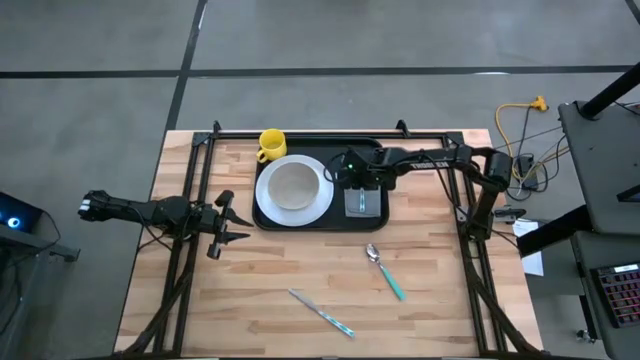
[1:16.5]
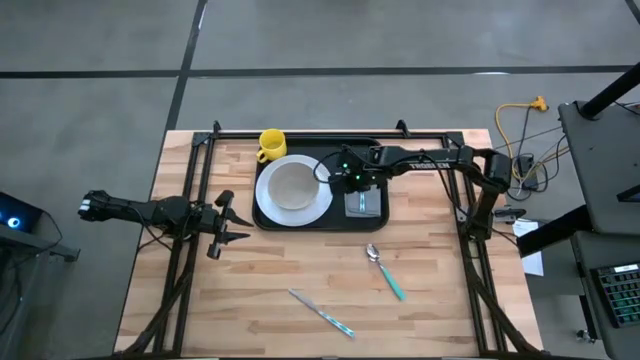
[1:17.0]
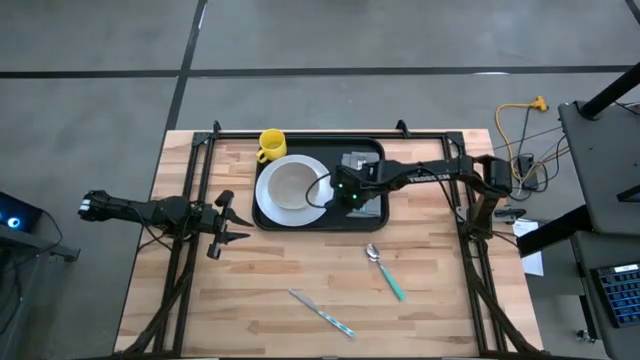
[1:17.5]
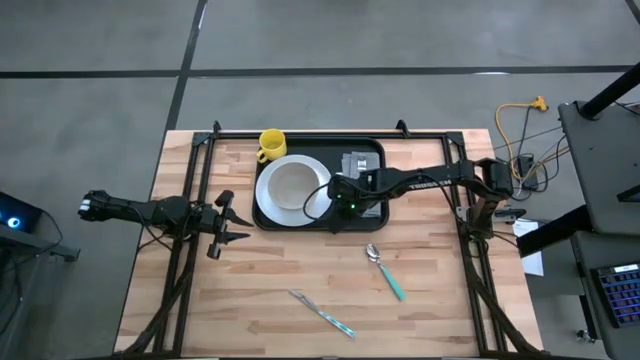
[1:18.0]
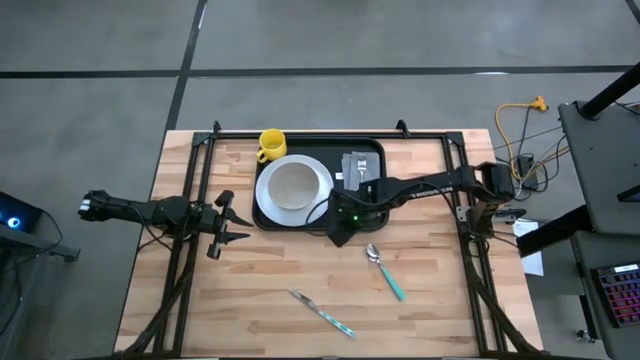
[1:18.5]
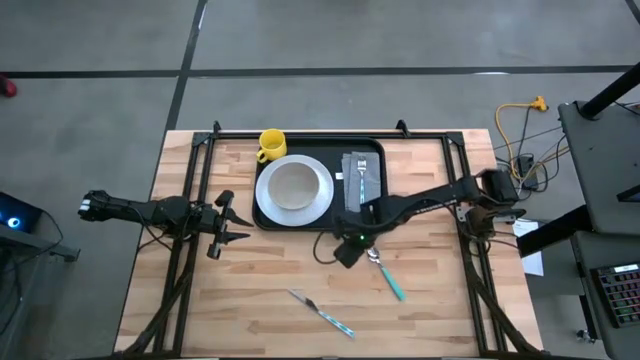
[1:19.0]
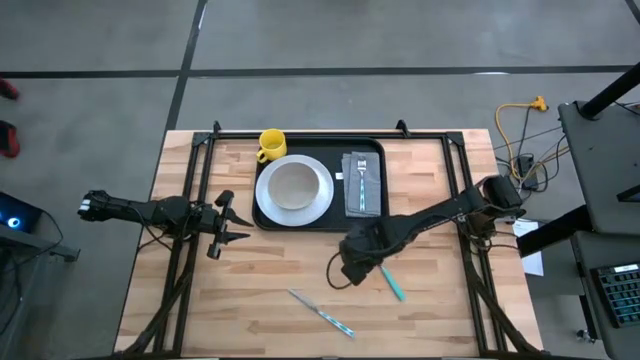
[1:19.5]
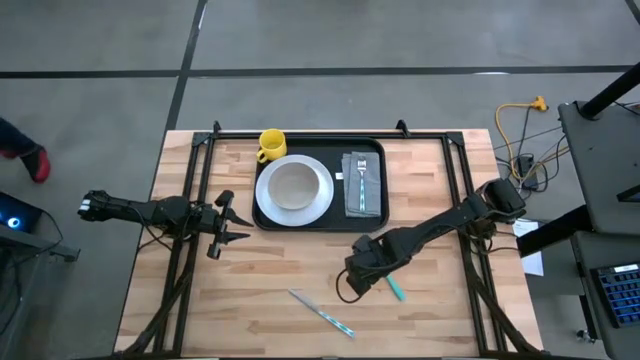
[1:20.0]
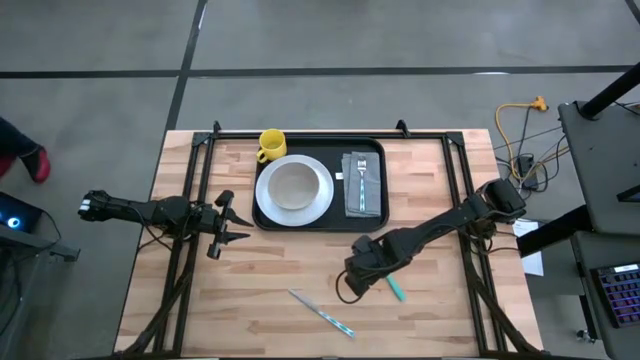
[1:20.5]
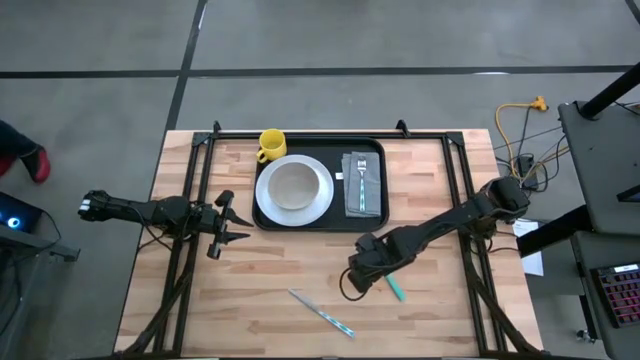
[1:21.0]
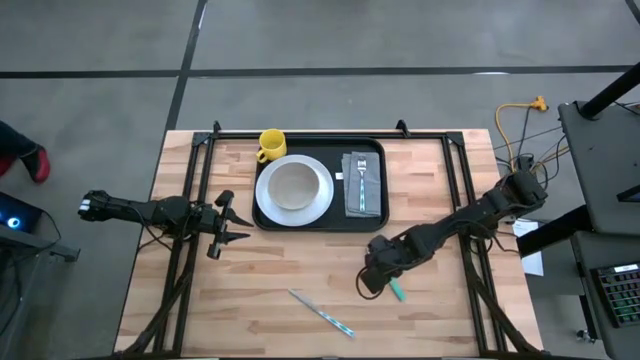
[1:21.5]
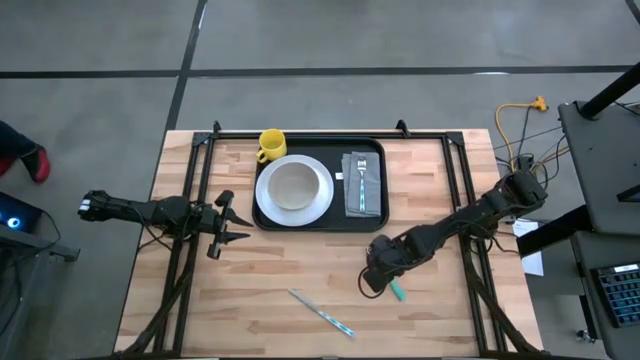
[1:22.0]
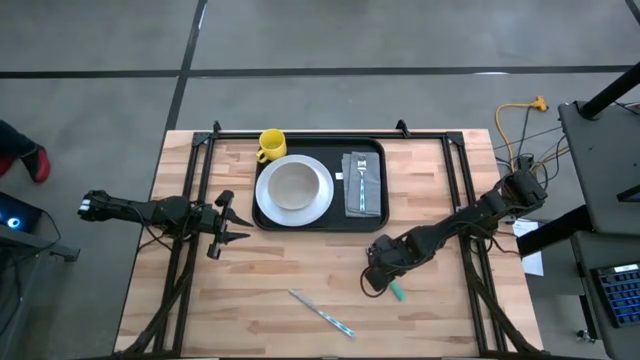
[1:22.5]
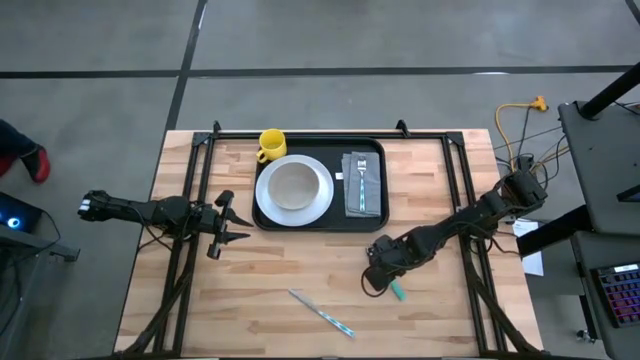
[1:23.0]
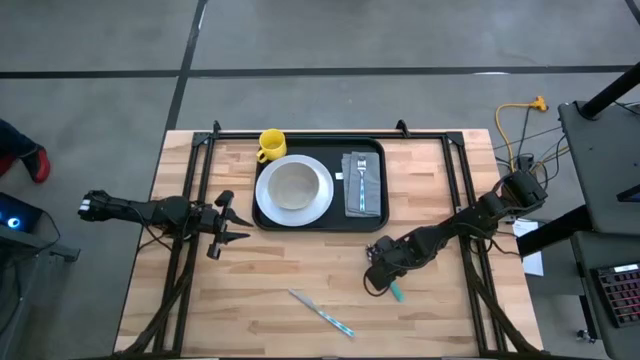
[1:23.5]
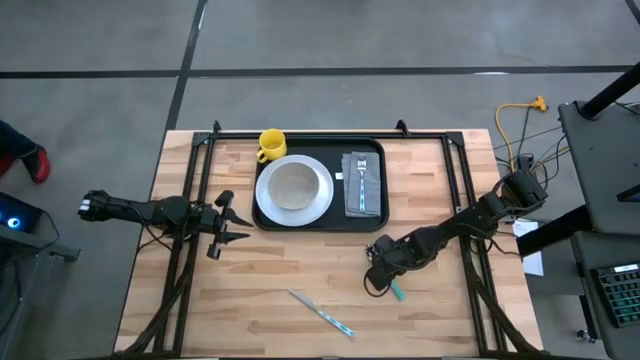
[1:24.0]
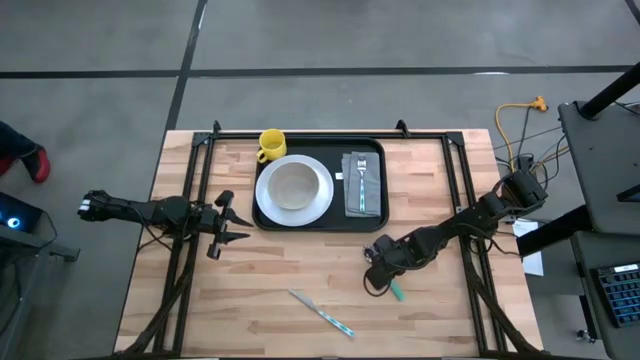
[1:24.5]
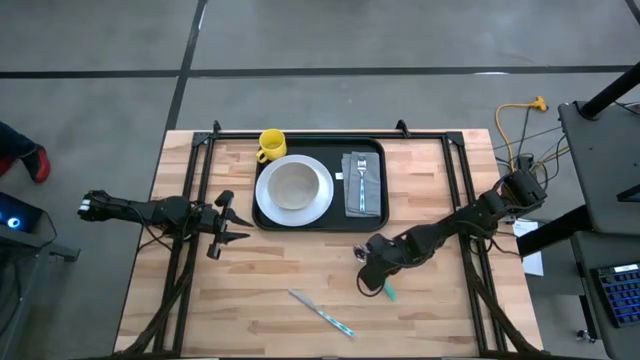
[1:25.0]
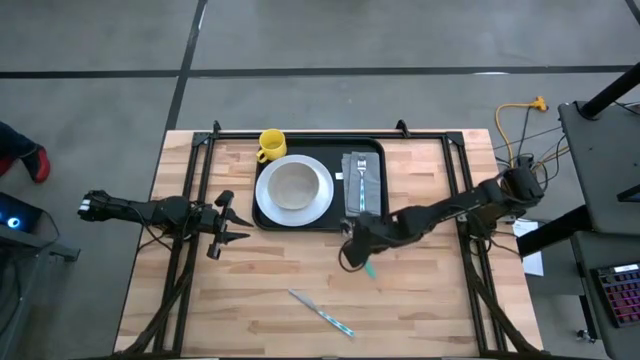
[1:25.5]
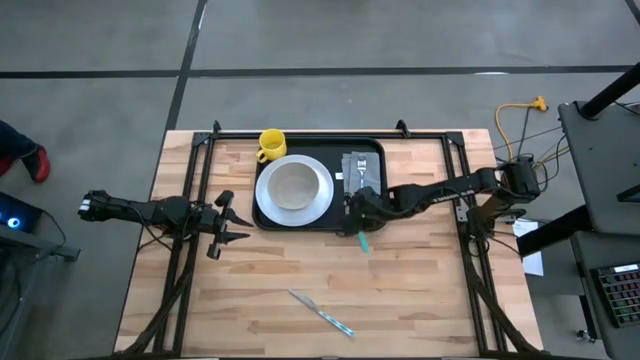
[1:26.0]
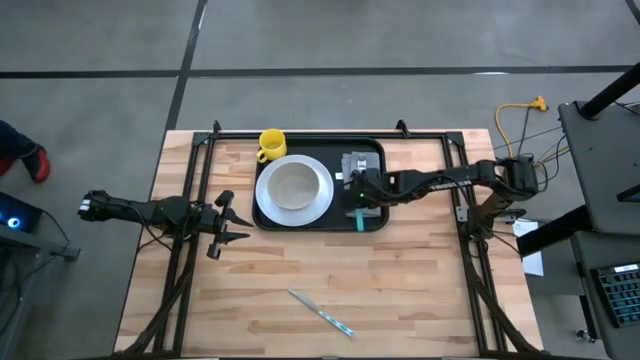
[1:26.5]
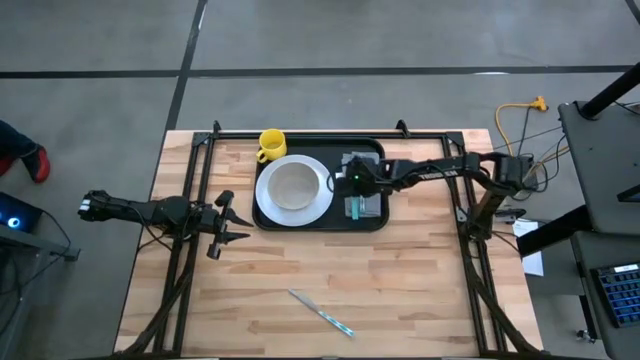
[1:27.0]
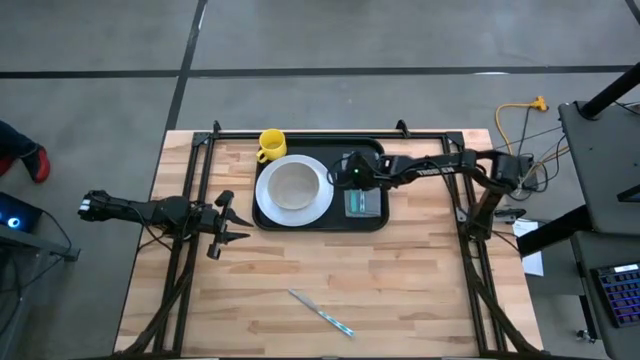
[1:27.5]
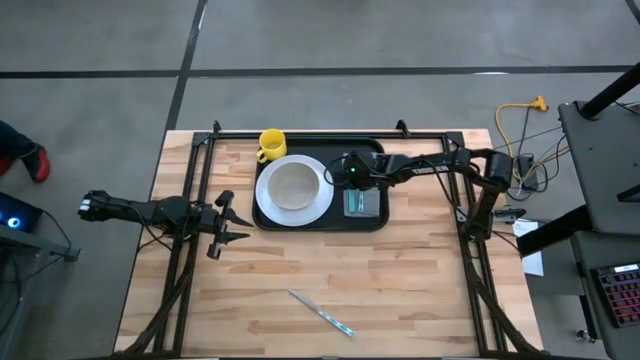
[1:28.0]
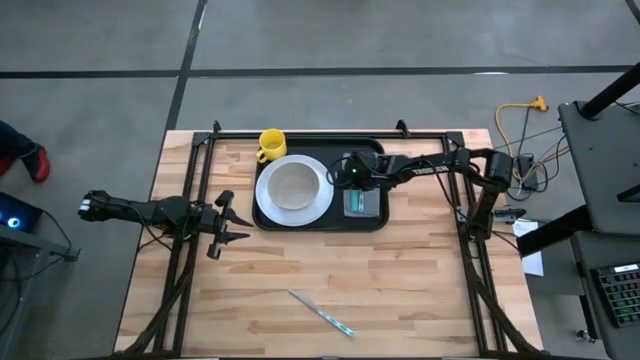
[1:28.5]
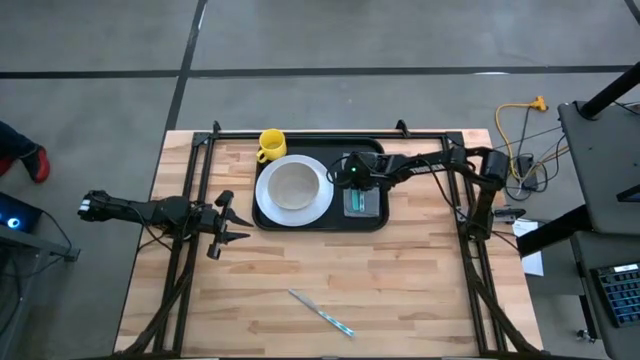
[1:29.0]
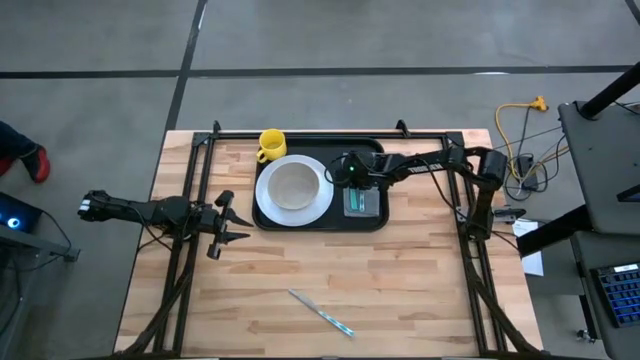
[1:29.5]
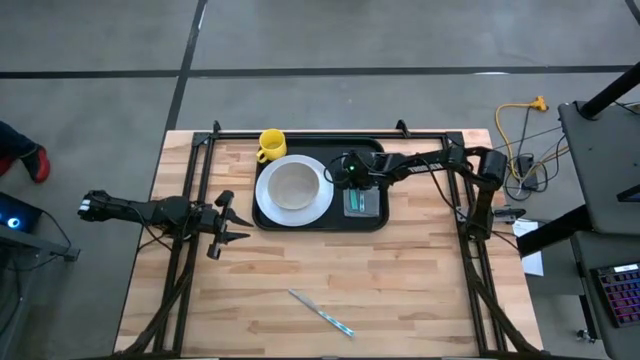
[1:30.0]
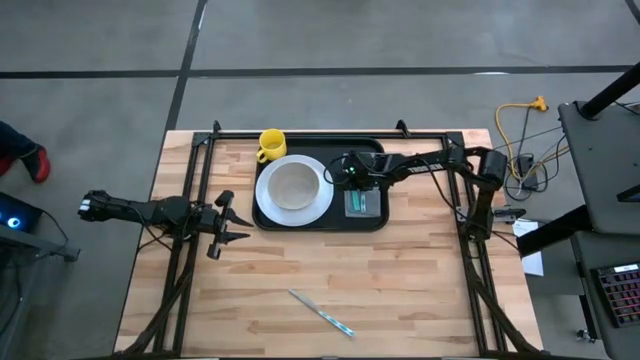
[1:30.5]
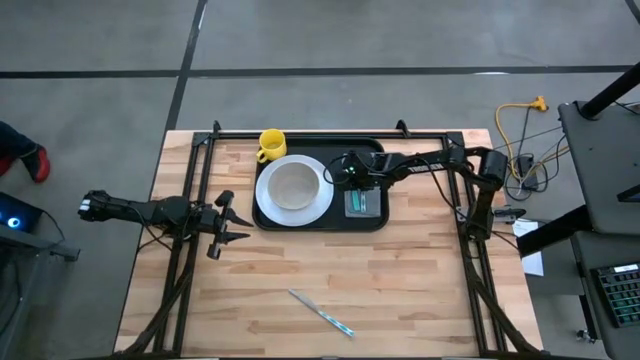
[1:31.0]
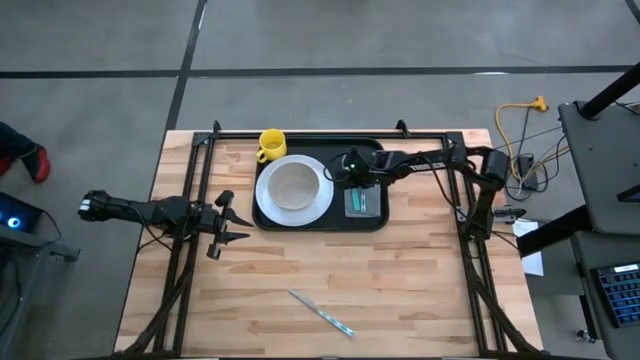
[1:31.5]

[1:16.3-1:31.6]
Task: Set up tray
Put the blue spoon on top of the napkin beside the blue and white fork

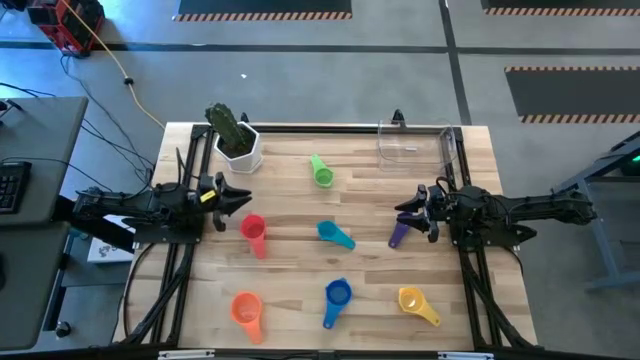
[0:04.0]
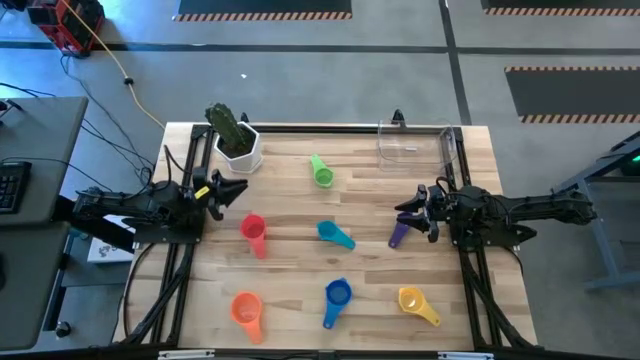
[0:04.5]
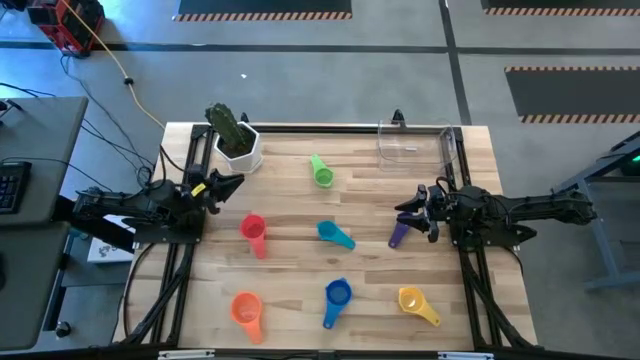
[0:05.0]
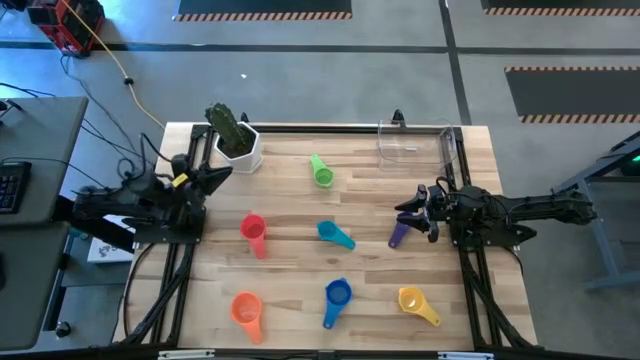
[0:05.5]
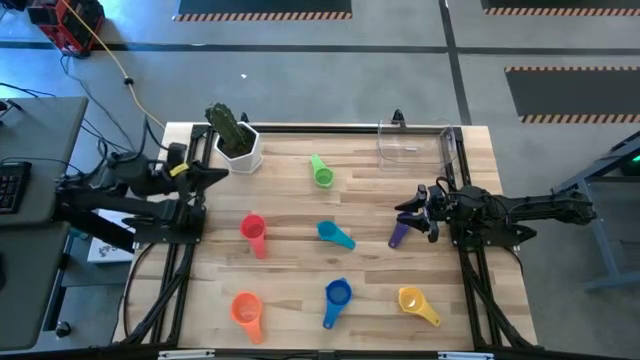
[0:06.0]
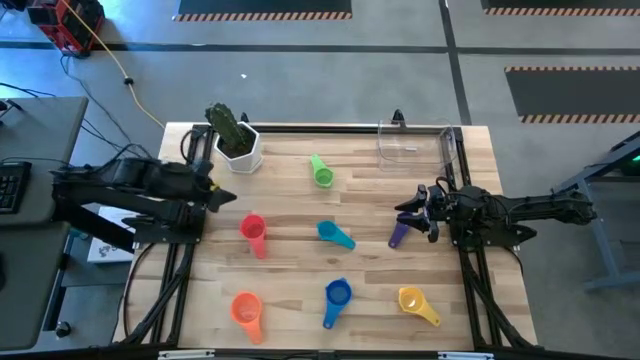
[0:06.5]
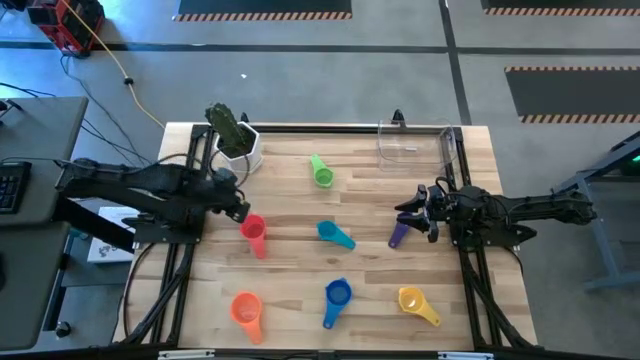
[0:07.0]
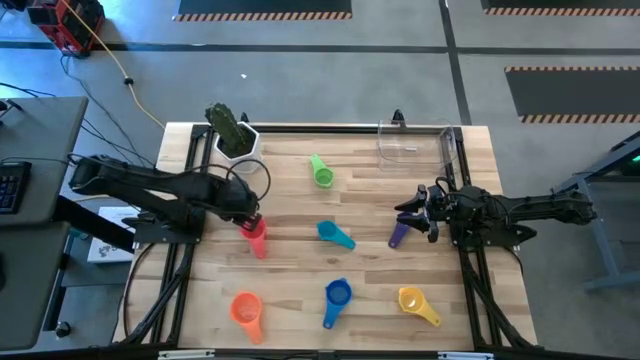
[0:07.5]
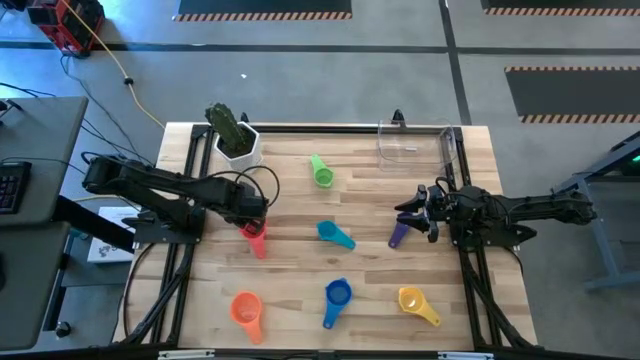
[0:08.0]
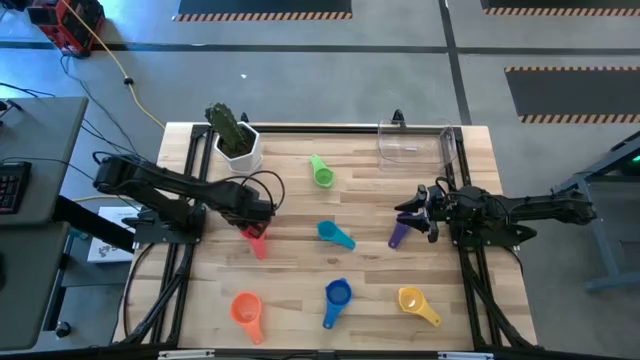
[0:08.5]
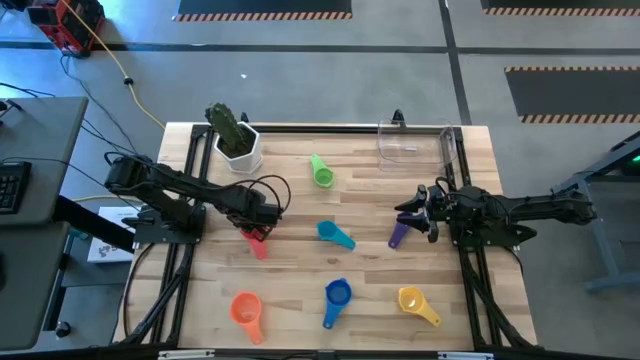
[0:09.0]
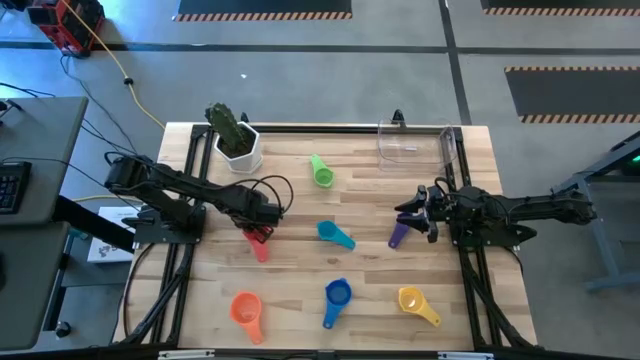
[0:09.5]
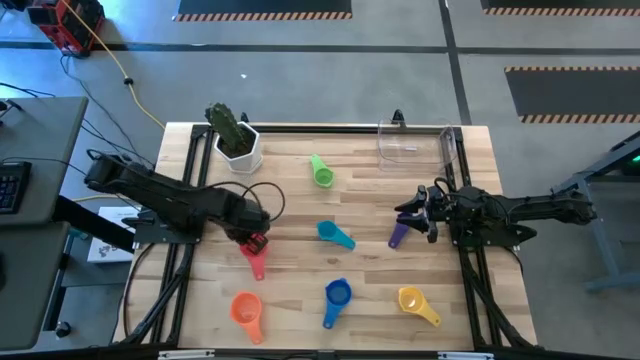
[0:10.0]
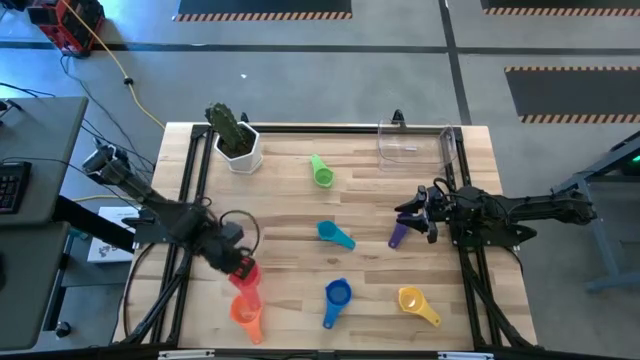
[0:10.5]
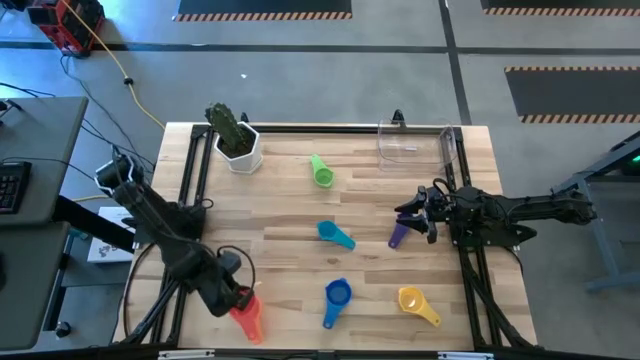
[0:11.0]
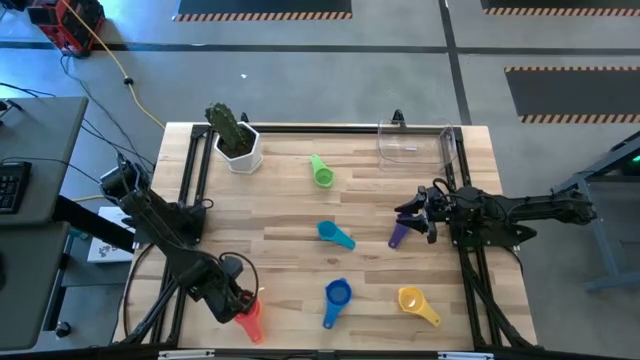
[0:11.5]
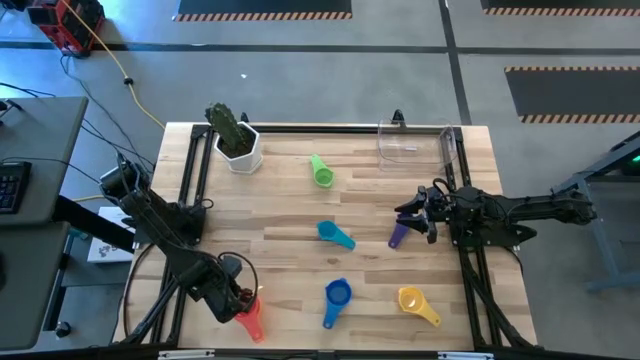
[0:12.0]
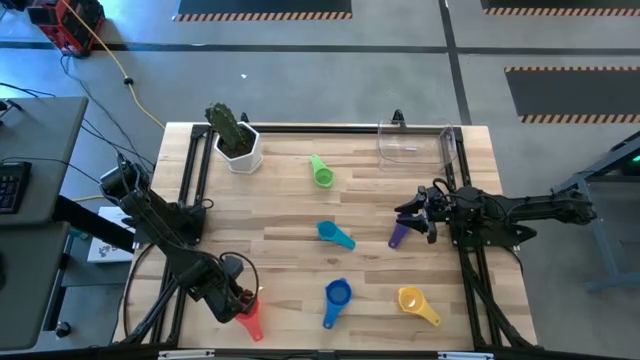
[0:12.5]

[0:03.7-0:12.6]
Task: Nest measuring cups in basket
Stack the pink measuring cup on the orange measuring cup
